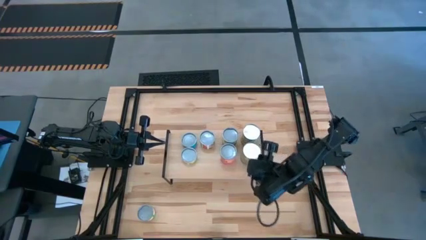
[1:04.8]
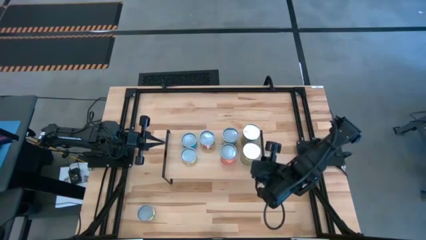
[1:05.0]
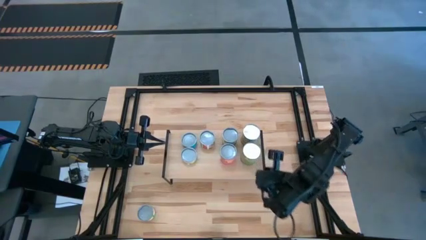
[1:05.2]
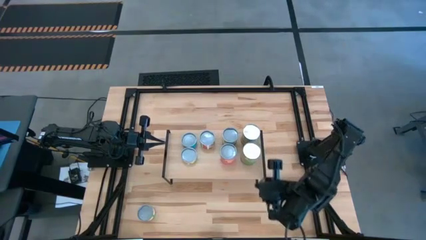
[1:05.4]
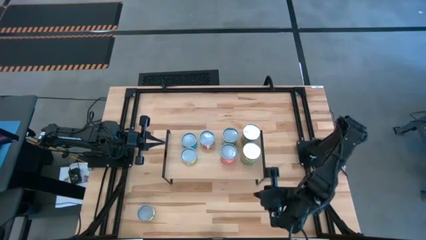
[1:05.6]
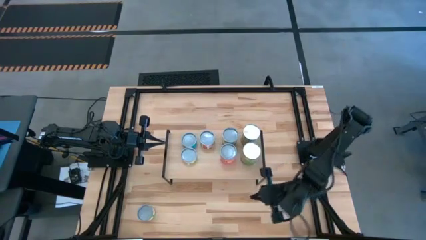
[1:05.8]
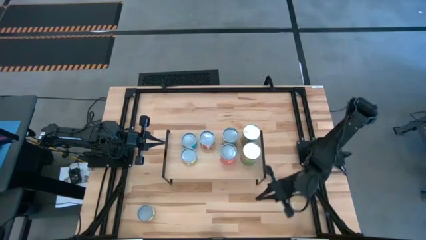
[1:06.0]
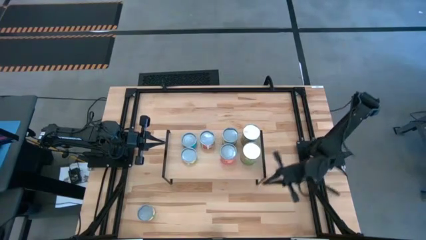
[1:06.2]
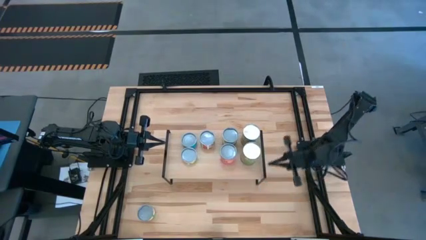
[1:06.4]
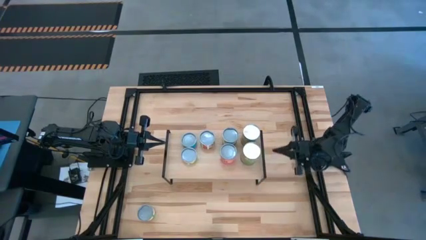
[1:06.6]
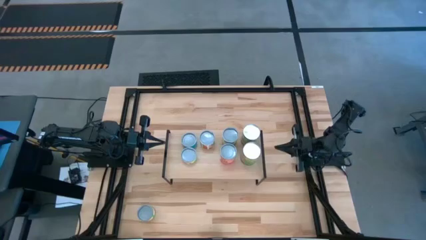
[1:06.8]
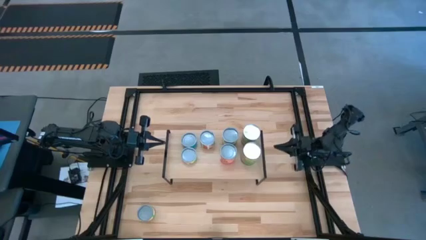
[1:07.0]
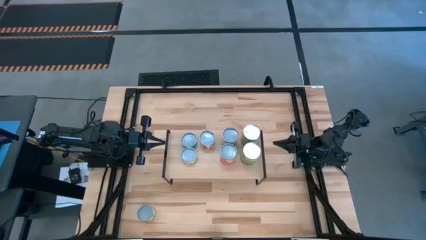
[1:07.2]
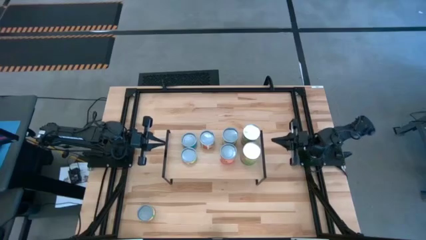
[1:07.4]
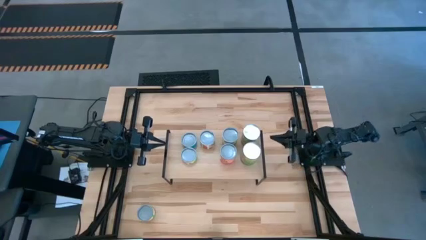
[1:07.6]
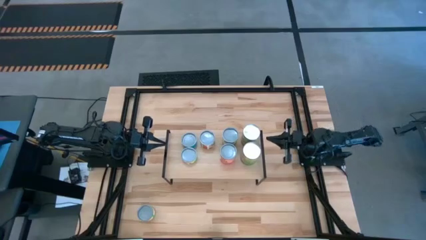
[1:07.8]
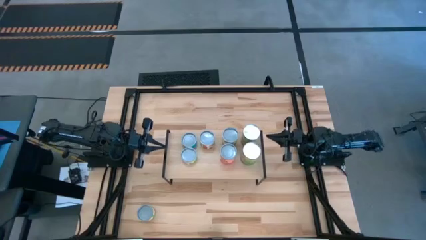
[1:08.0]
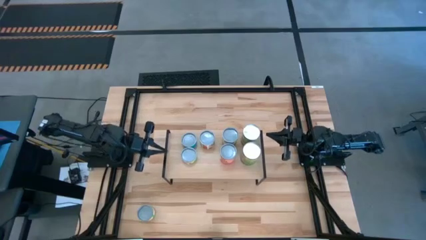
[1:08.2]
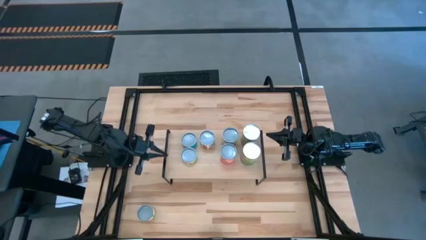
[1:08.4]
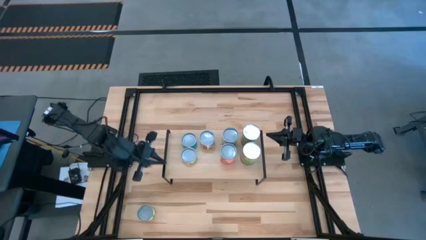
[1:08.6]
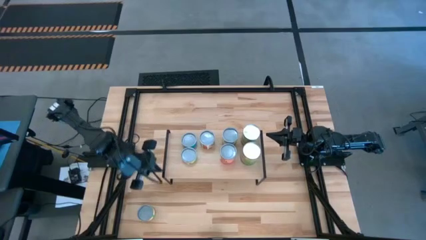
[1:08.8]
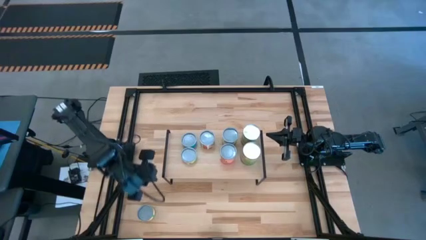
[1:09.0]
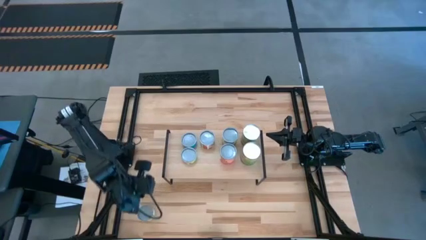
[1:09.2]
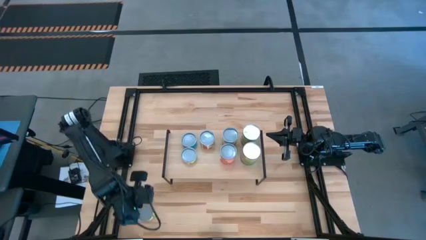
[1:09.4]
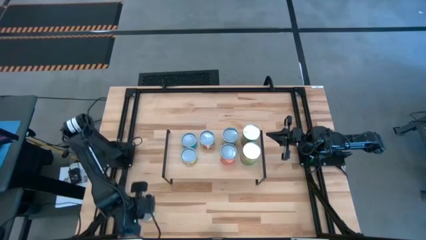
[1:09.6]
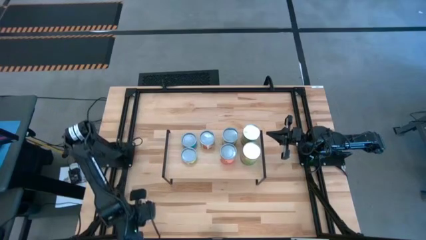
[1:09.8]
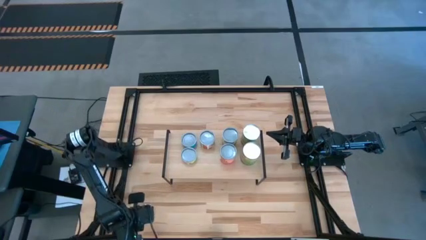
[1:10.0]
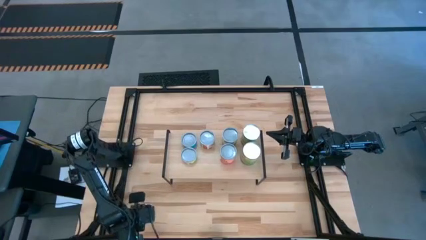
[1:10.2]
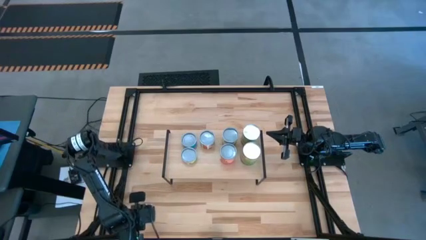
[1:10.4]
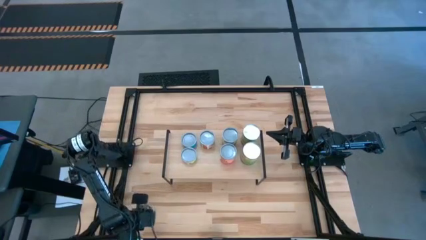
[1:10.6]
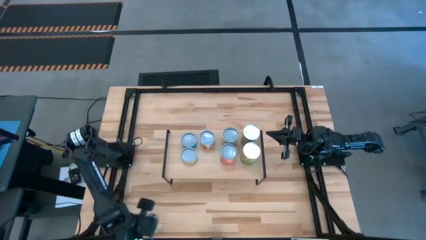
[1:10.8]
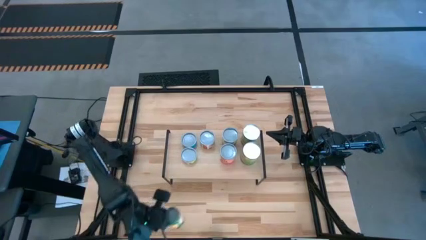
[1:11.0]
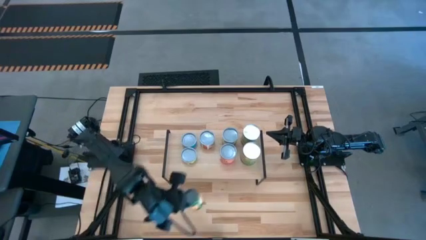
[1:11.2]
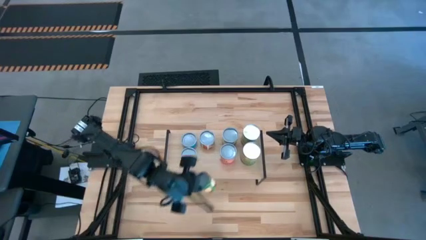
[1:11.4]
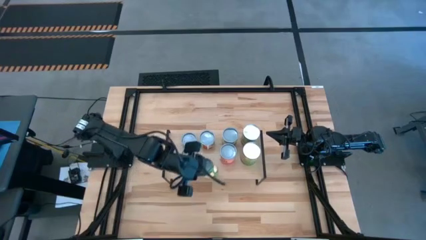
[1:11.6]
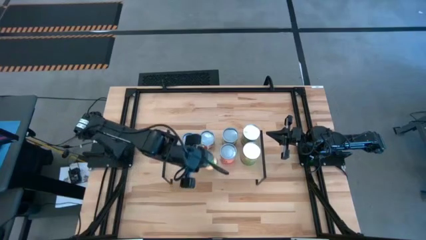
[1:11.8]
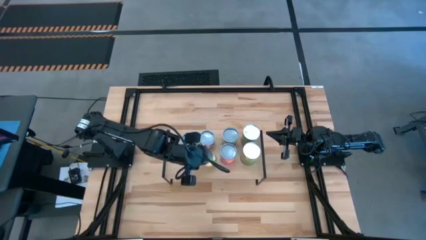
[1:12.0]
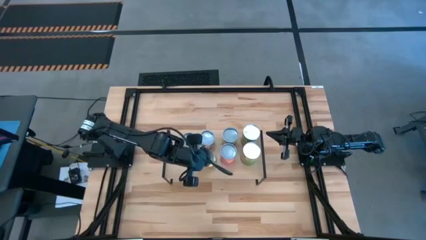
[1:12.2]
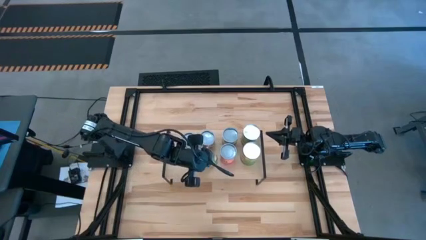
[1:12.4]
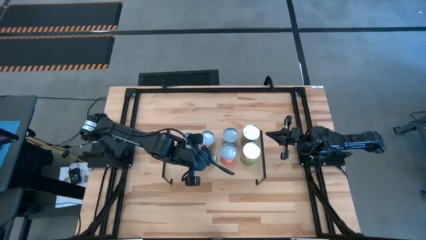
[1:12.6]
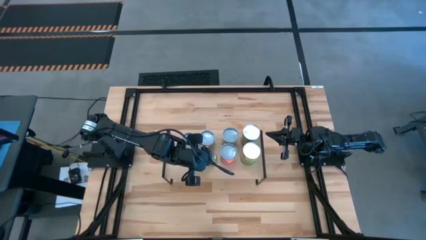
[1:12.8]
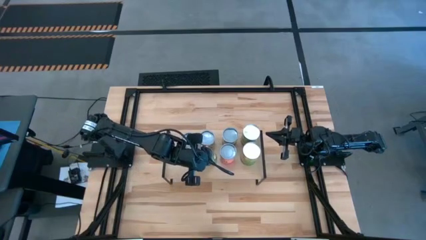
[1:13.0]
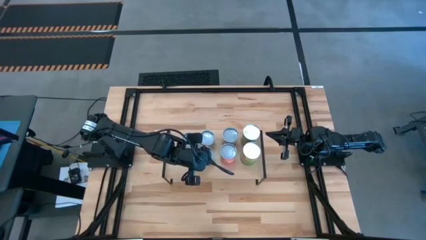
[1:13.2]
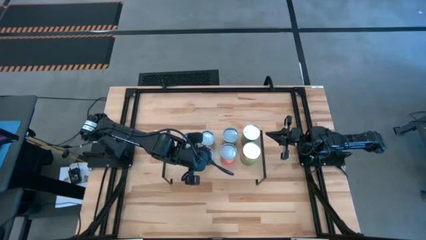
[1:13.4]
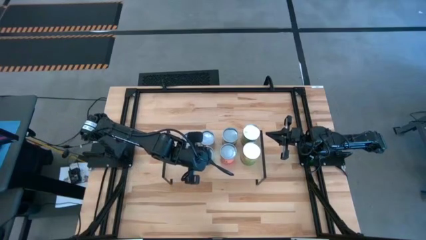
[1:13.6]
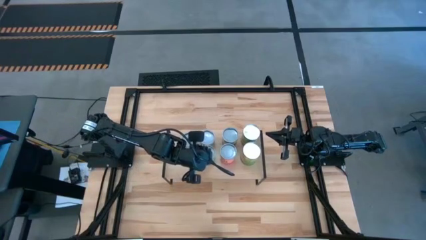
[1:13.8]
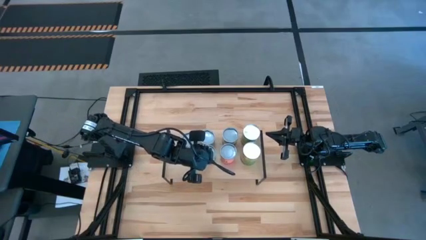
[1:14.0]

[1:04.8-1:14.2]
Task: Pick and place cans onto a shelf
Put the canned sliced oranges on the shelf

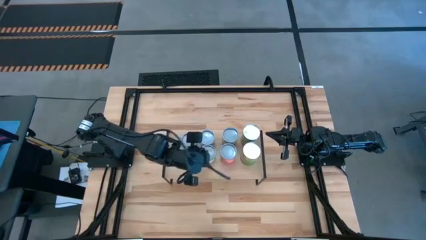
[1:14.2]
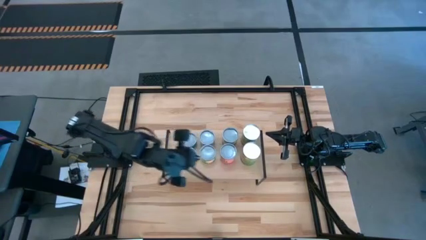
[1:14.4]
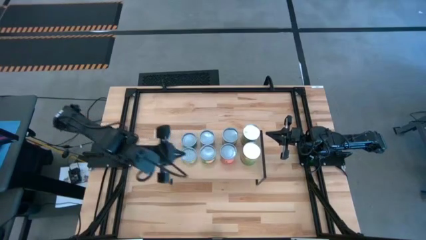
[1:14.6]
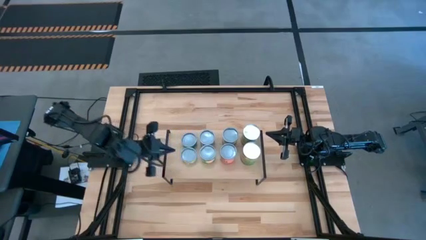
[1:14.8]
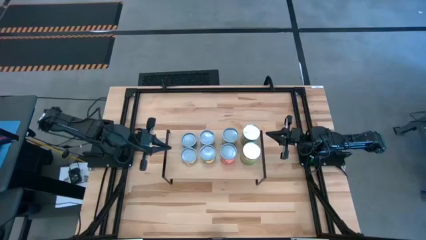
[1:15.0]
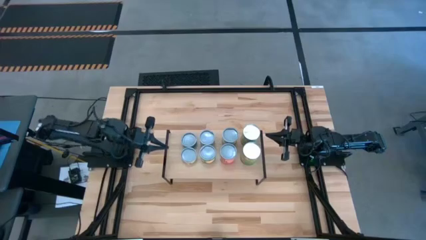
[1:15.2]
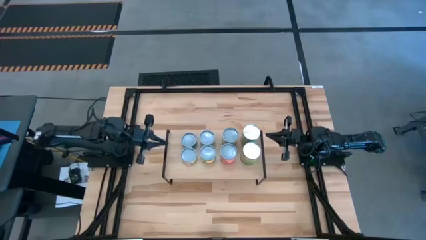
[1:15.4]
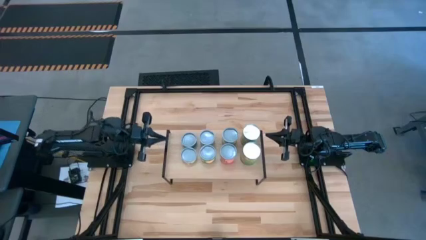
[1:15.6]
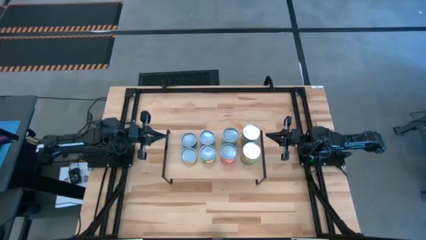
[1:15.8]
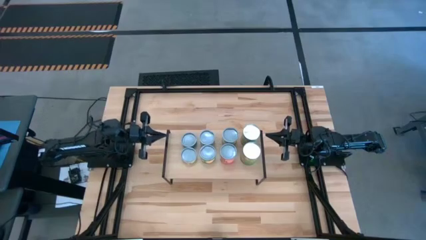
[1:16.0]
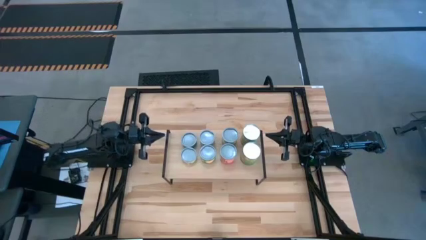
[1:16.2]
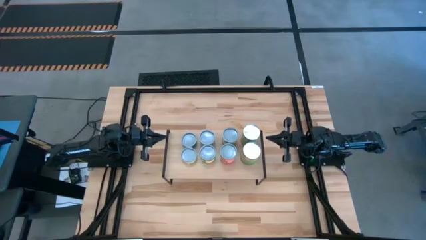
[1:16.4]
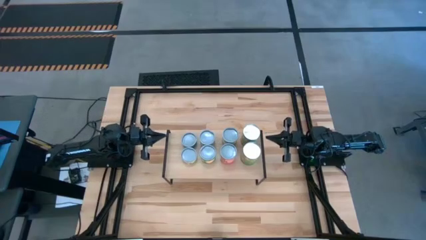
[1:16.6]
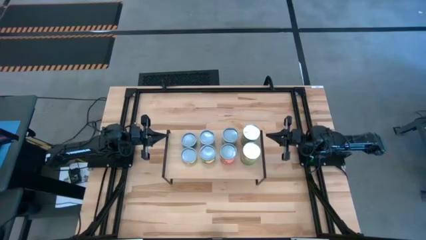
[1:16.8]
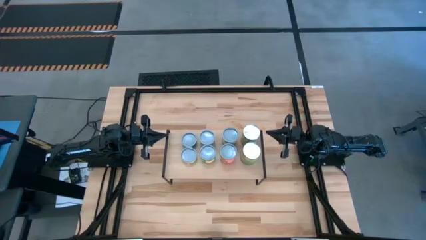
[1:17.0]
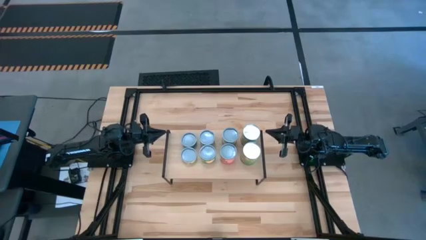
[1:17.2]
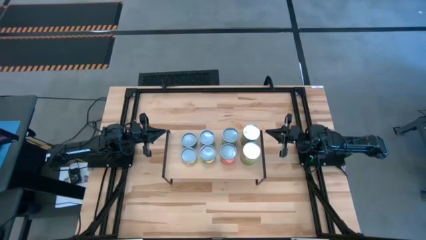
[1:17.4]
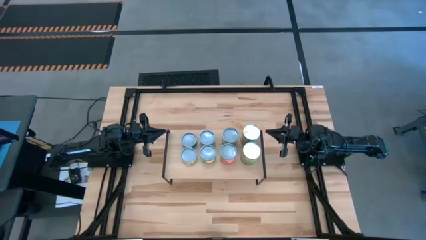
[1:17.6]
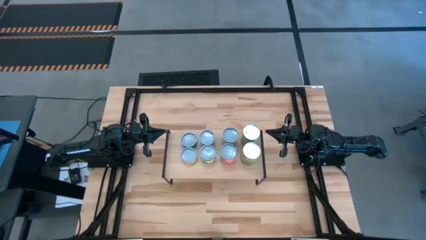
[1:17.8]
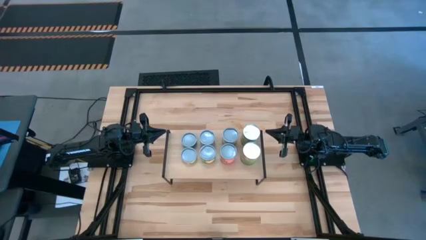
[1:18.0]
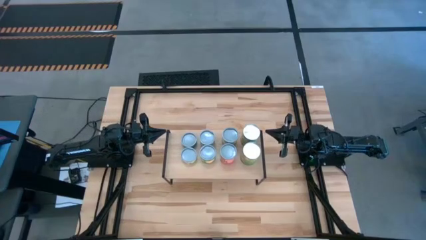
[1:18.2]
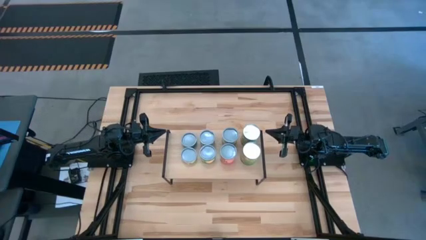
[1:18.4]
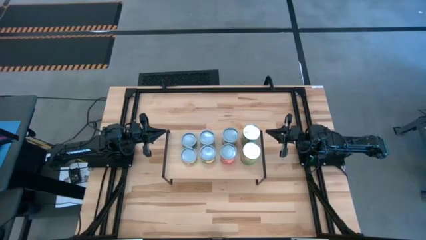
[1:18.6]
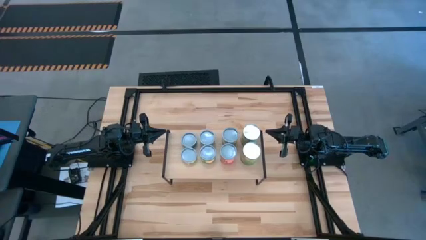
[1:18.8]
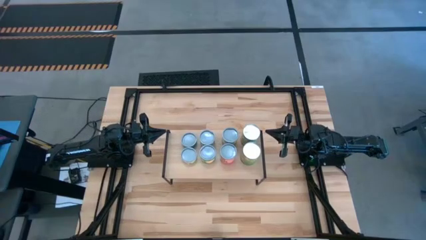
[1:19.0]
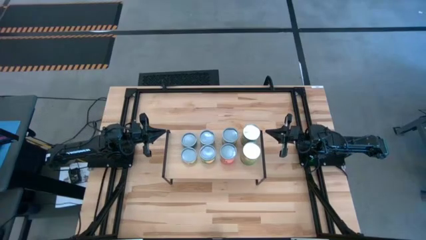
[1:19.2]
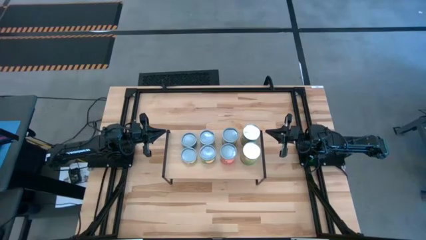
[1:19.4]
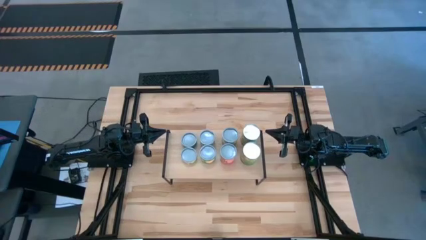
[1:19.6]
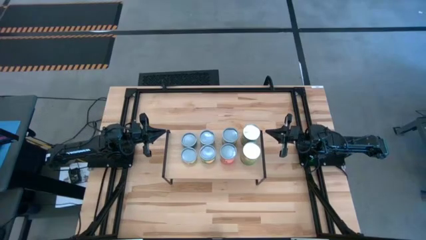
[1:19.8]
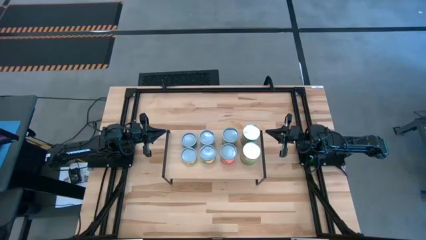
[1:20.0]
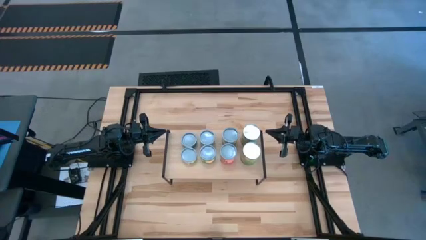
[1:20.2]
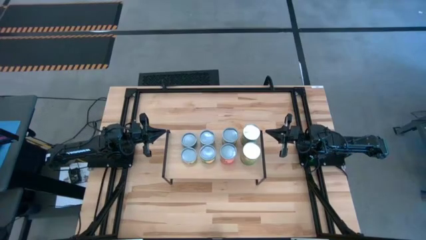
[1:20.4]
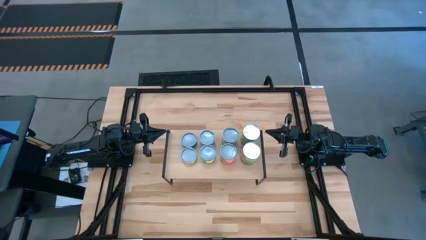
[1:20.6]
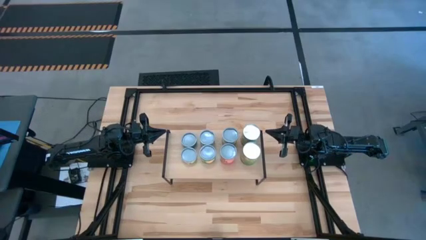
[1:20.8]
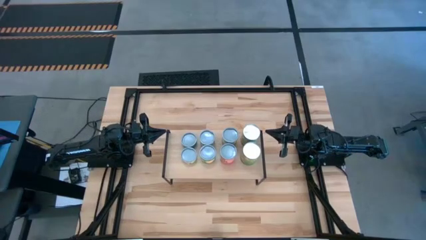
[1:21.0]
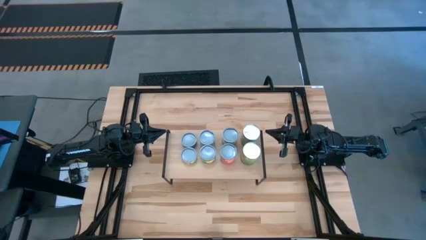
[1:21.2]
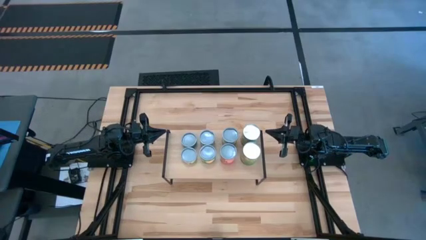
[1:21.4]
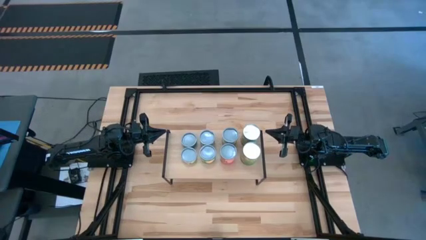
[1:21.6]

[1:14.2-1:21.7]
Return to home position
